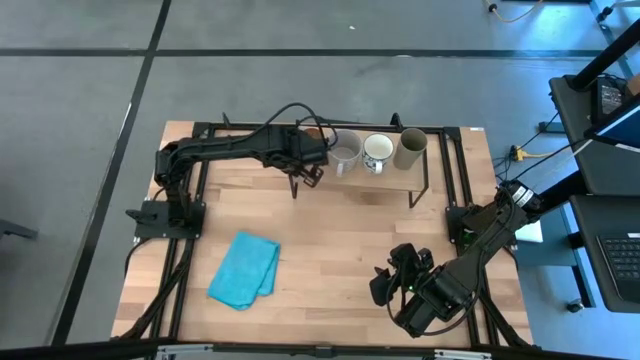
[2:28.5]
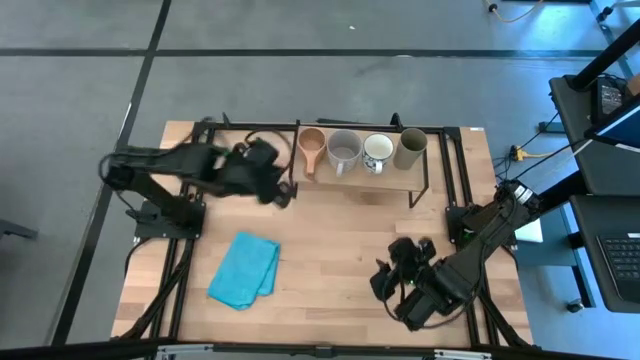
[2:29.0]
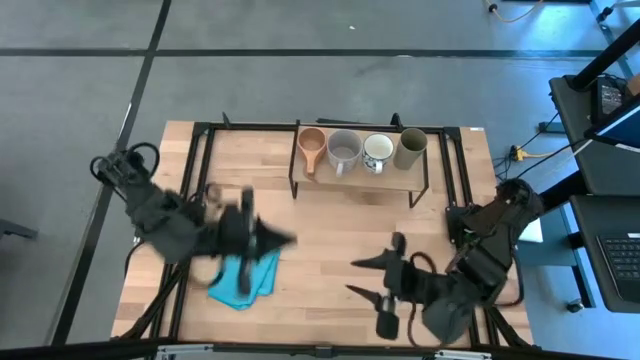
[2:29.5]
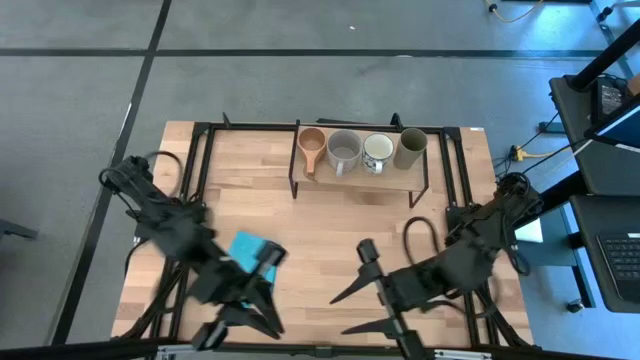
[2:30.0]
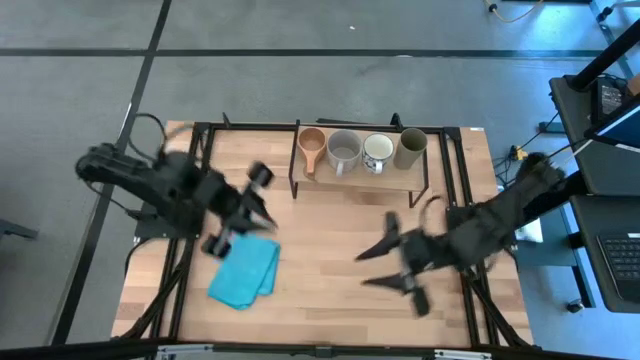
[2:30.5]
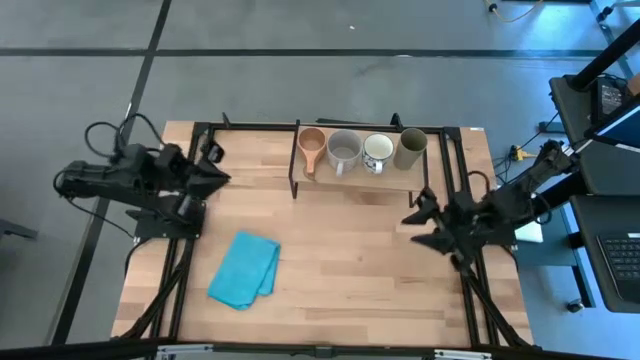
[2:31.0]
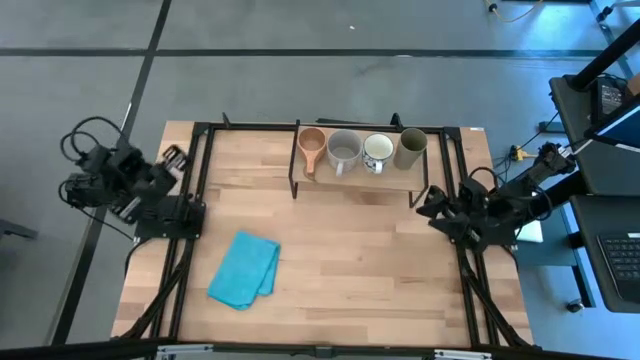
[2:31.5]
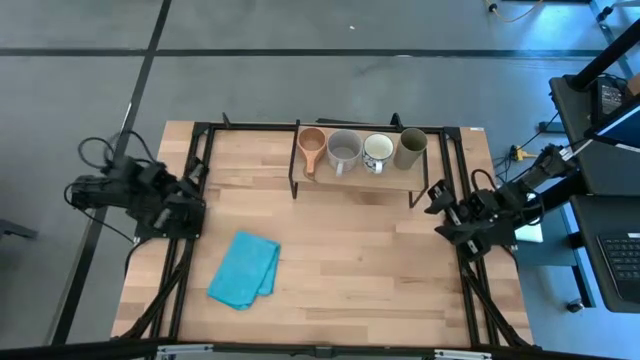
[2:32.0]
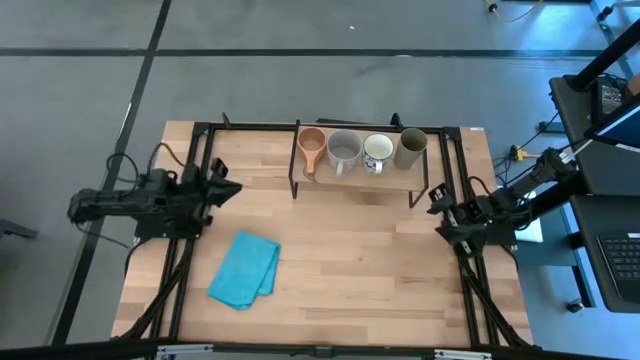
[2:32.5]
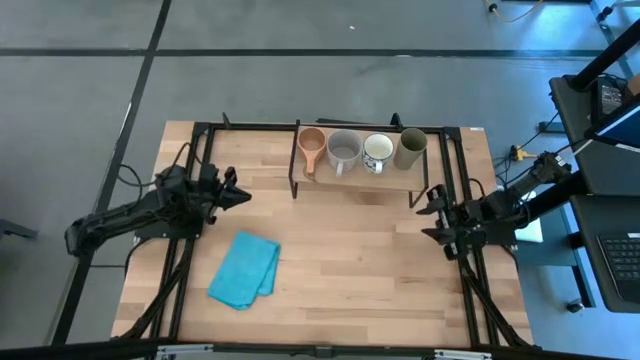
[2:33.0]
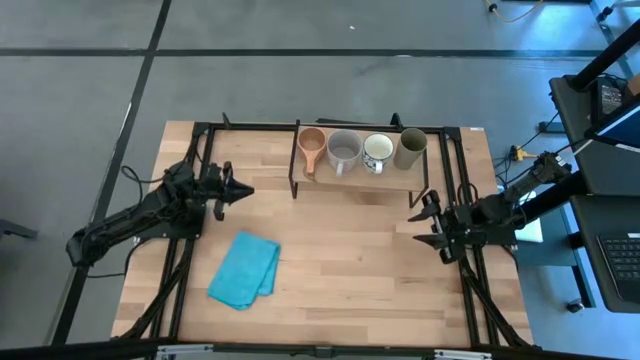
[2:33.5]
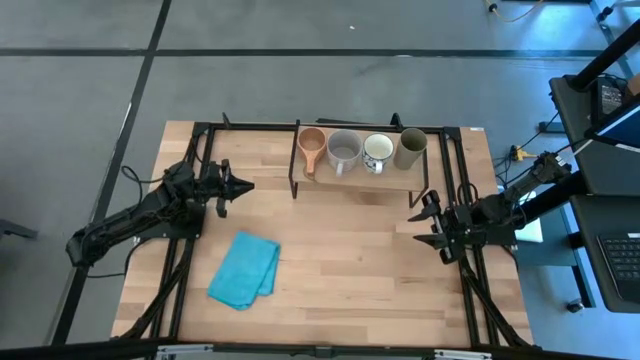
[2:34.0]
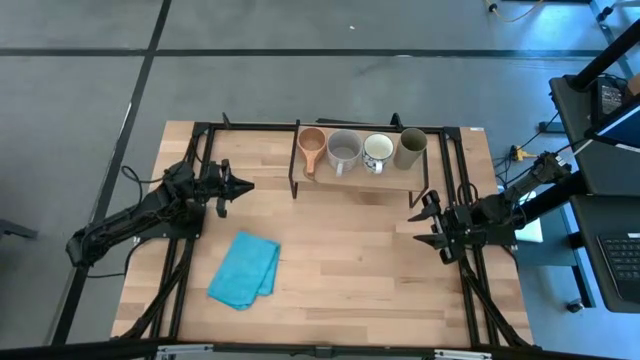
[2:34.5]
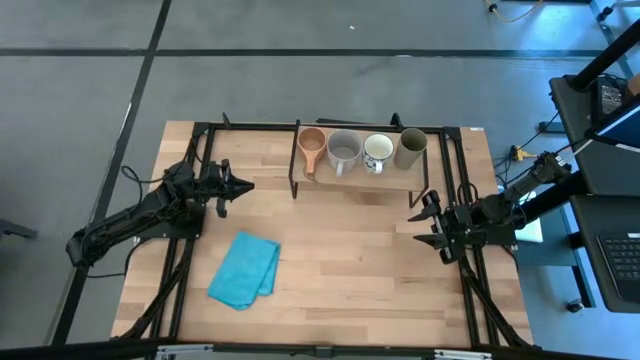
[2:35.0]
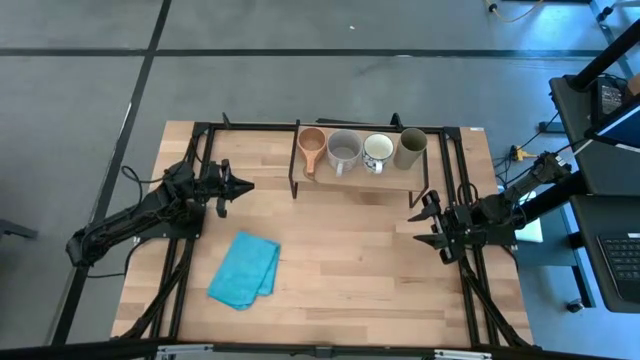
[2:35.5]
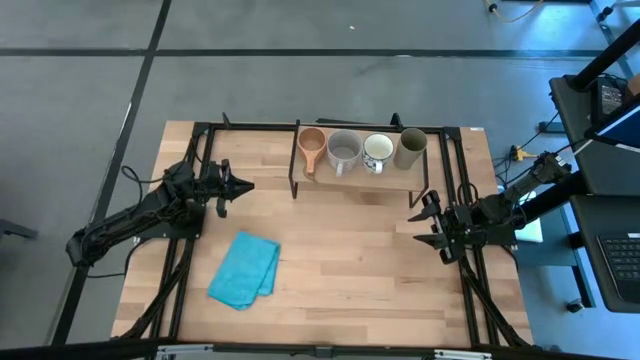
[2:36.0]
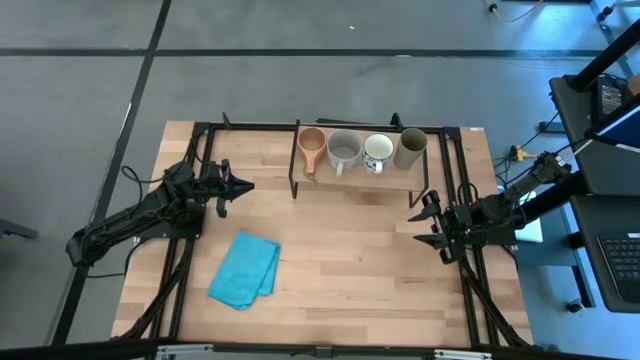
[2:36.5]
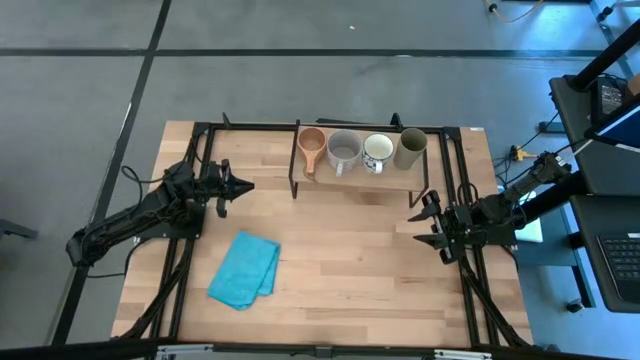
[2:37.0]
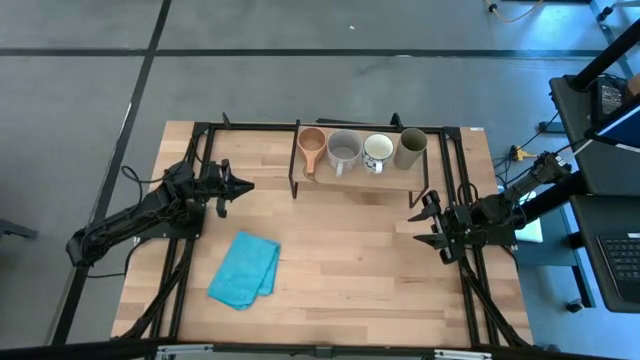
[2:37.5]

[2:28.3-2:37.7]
Task: Stack small to large cups/mugs on shelf
Return to Home Position

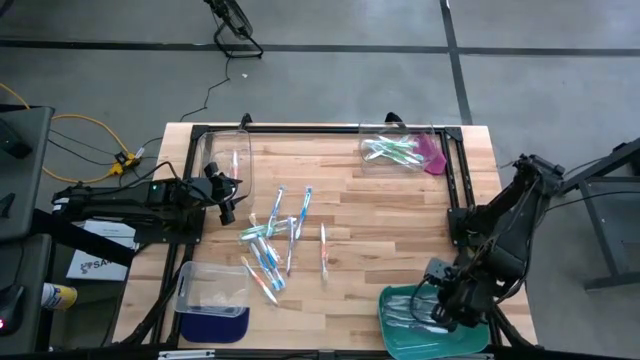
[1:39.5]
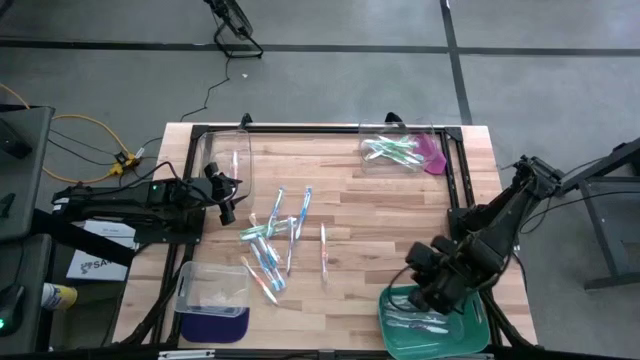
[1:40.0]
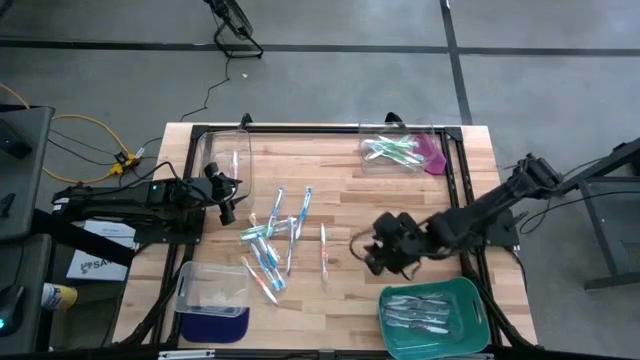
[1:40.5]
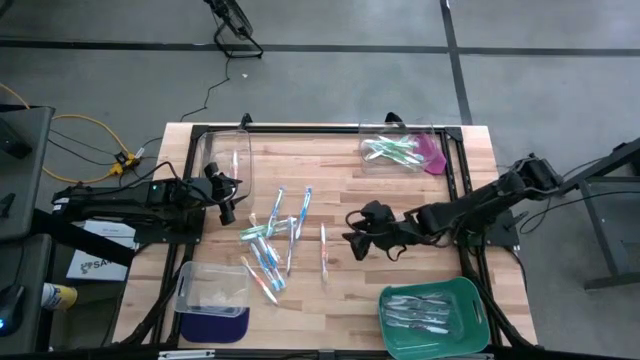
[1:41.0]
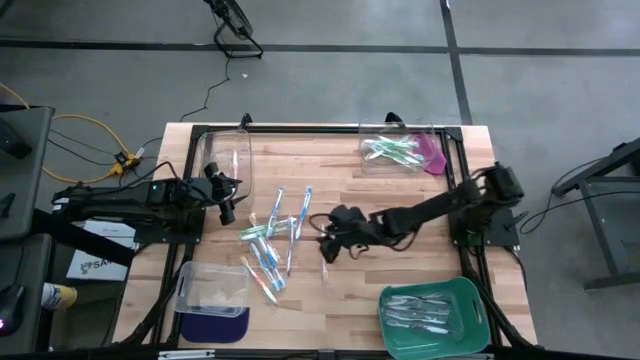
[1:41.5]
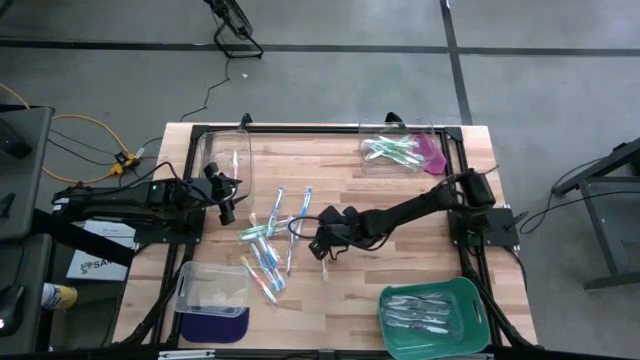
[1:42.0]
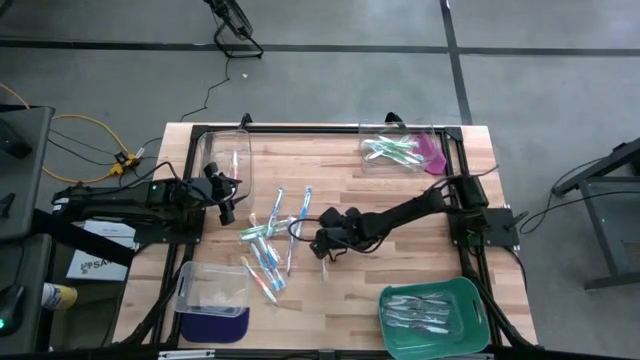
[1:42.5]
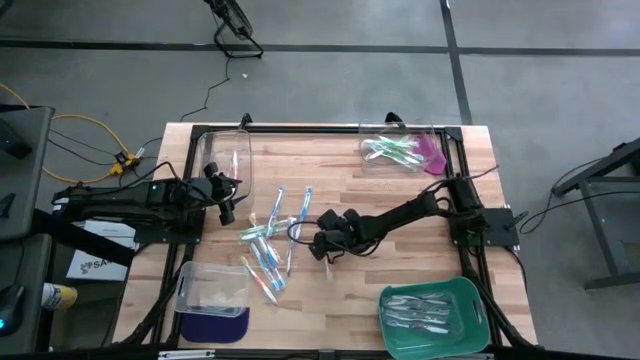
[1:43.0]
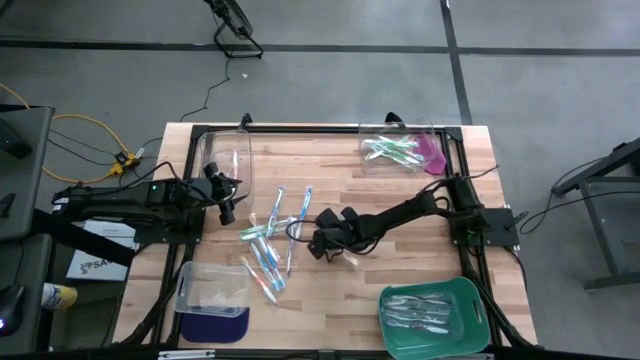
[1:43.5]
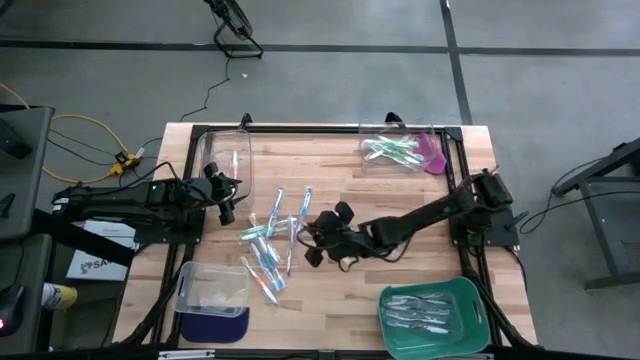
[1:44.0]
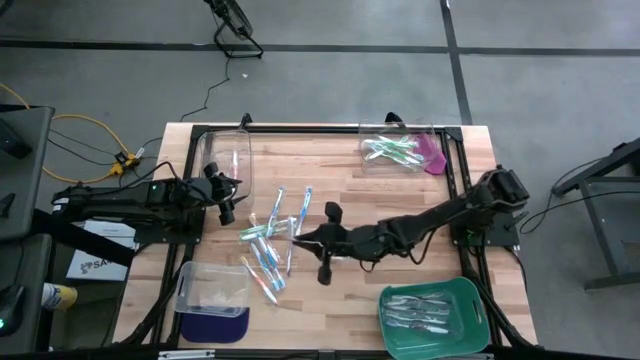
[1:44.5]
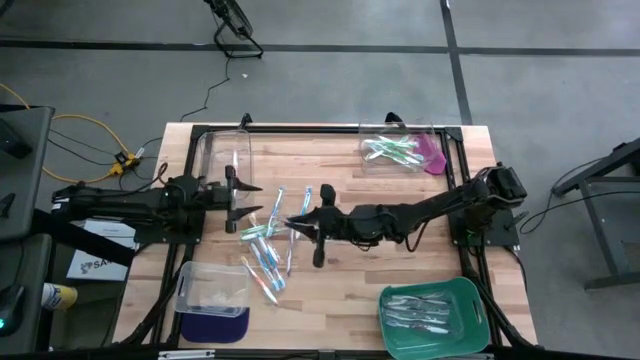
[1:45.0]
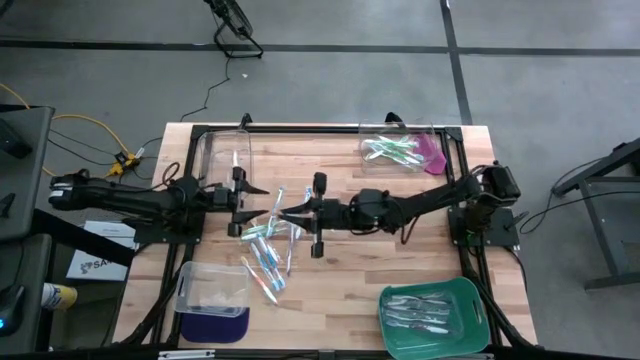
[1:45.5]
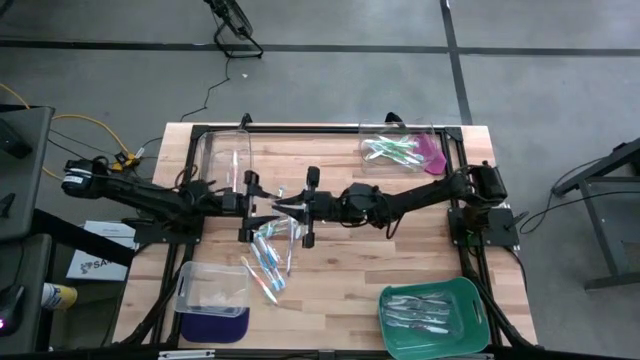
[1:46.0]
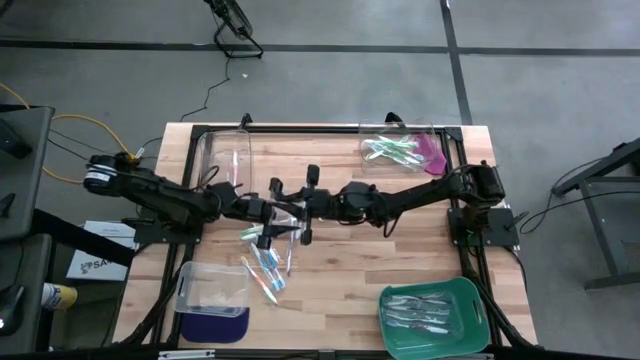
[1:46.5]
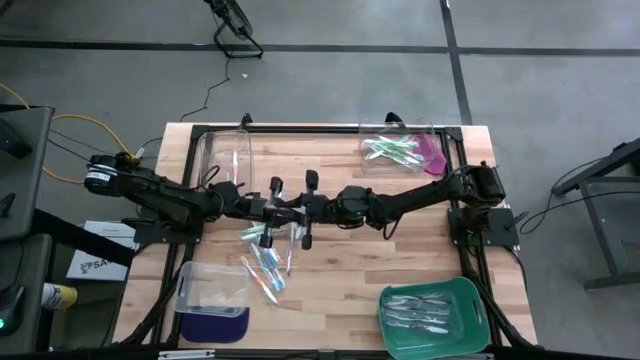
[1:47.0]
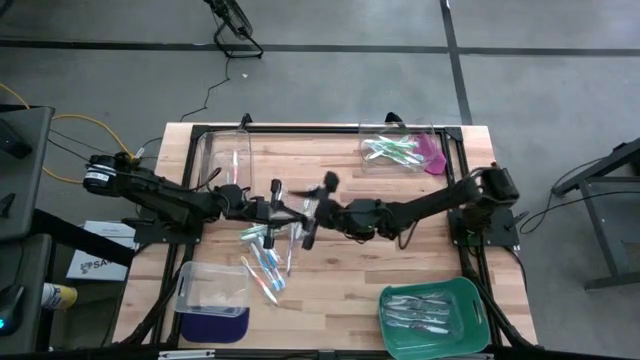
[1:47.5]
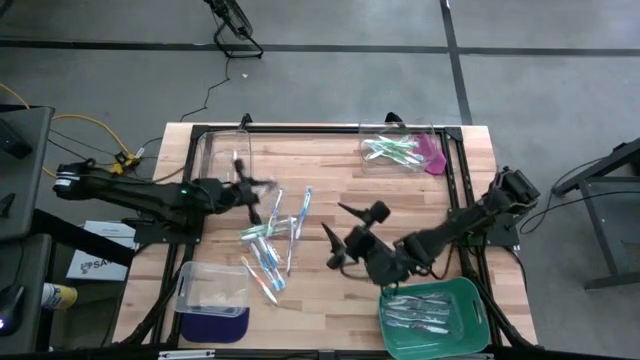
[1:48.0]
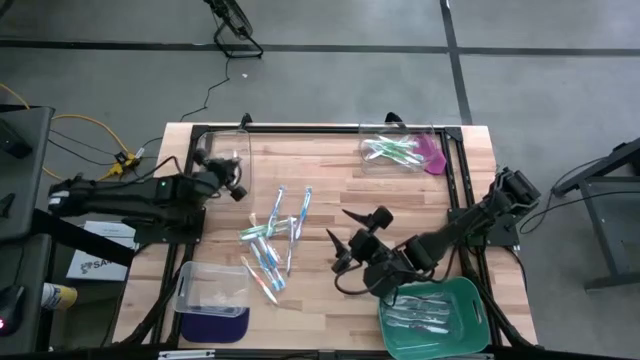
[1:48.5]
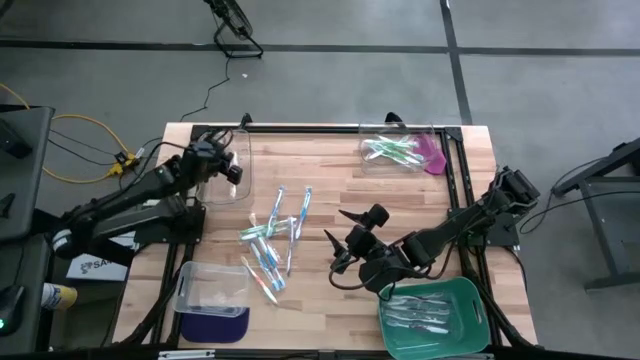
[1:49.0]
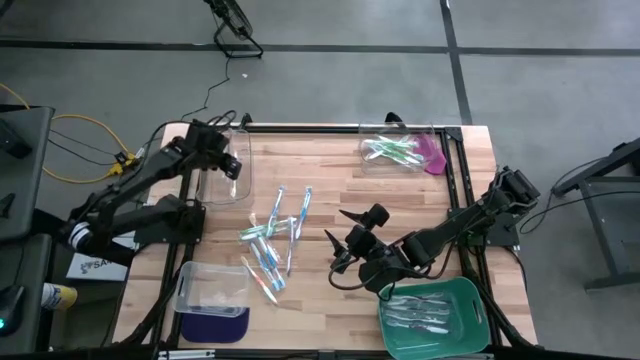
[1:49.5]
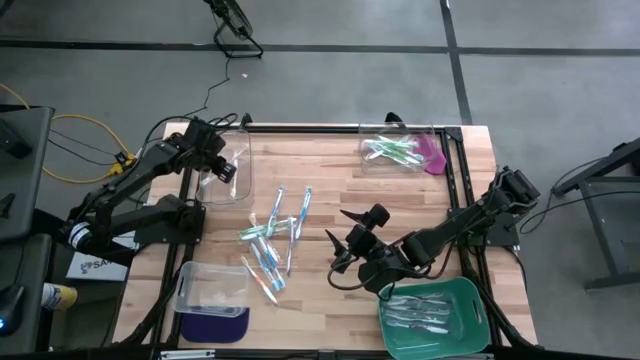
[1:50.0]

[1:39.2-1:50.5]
Task: Pick & Place Toothbrushes
Put the orange toothbrush into the top left transparent bin
